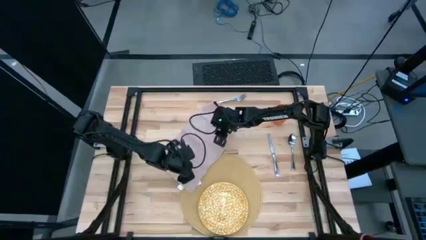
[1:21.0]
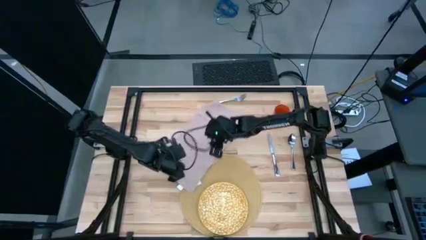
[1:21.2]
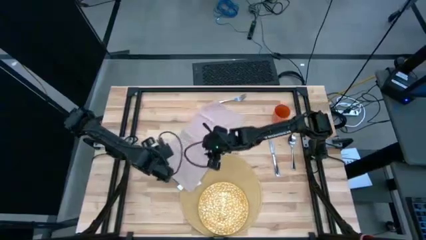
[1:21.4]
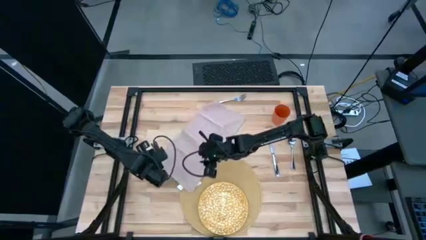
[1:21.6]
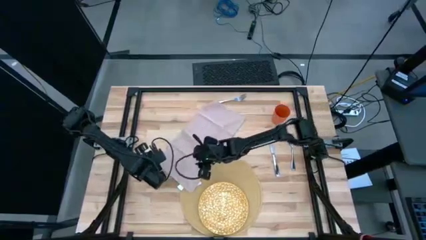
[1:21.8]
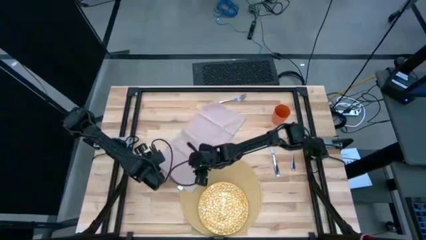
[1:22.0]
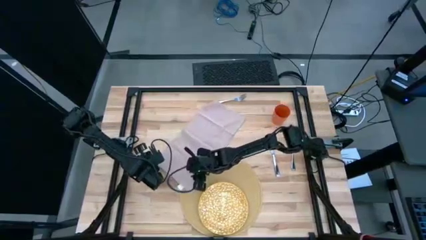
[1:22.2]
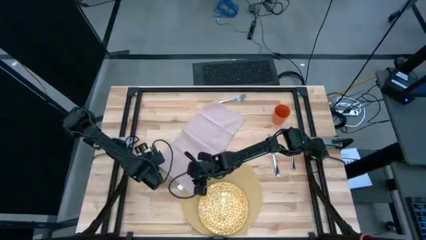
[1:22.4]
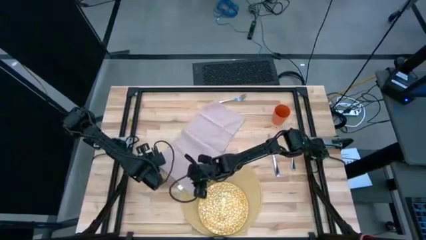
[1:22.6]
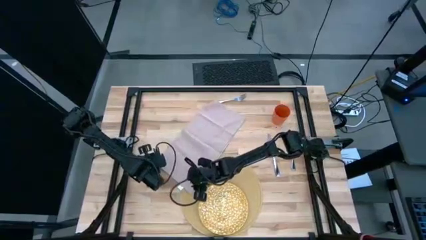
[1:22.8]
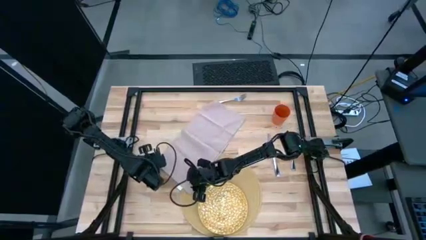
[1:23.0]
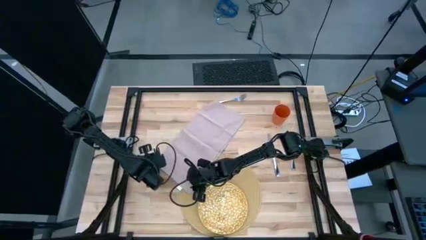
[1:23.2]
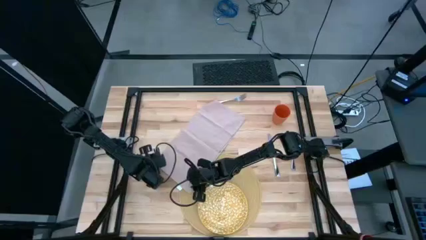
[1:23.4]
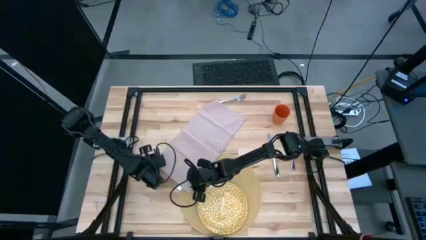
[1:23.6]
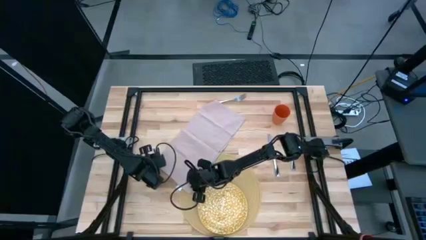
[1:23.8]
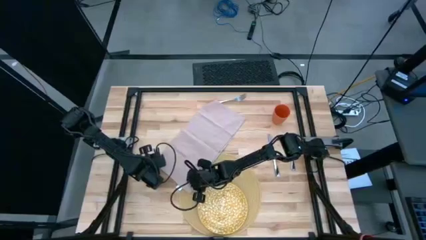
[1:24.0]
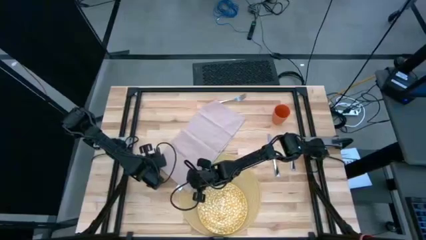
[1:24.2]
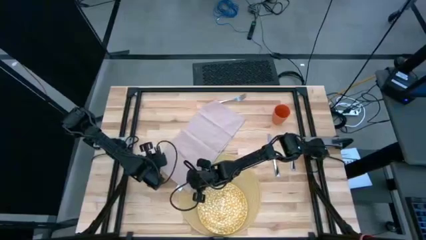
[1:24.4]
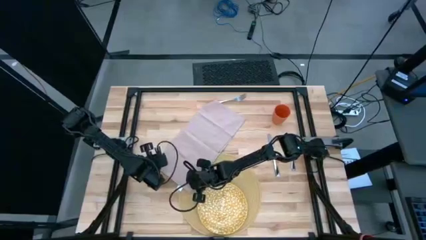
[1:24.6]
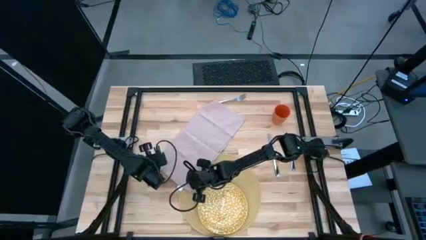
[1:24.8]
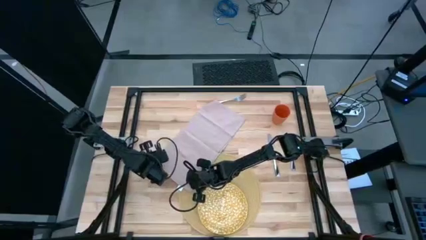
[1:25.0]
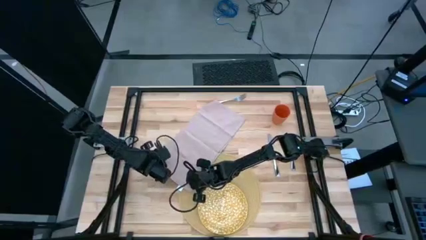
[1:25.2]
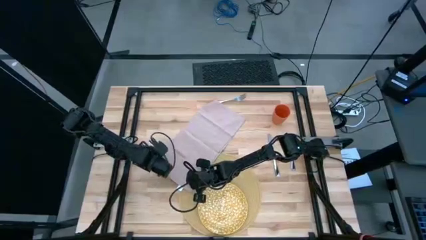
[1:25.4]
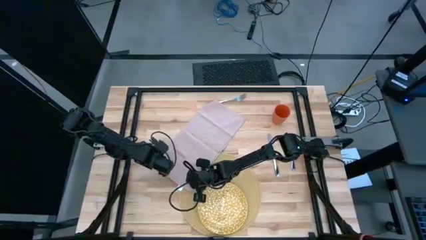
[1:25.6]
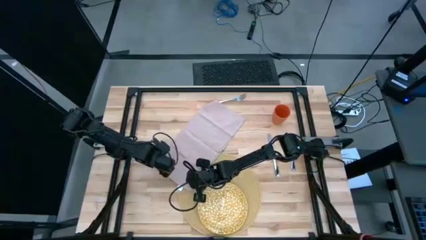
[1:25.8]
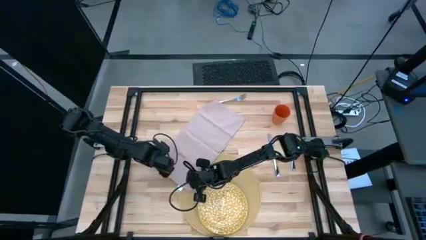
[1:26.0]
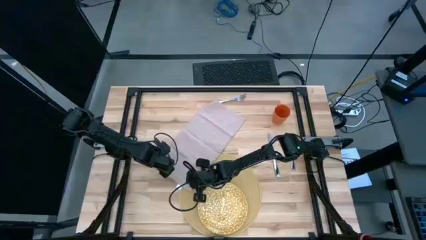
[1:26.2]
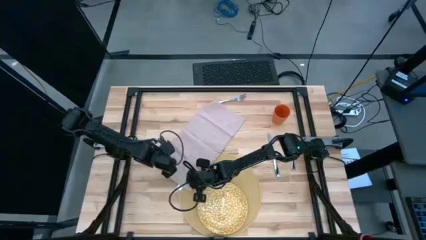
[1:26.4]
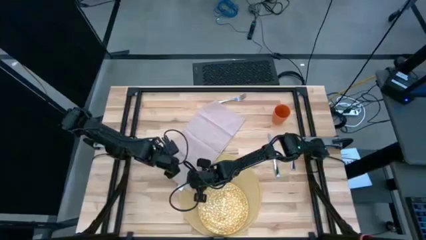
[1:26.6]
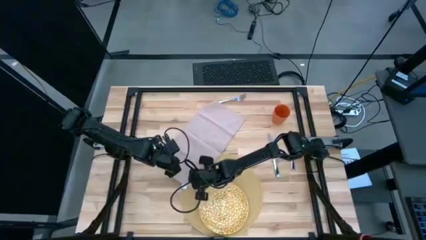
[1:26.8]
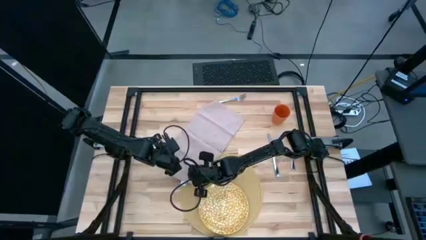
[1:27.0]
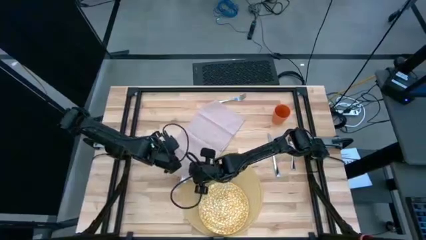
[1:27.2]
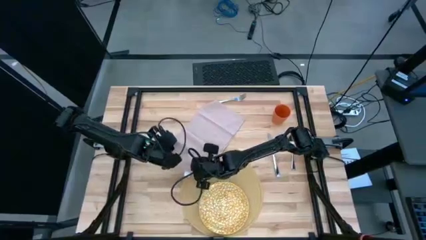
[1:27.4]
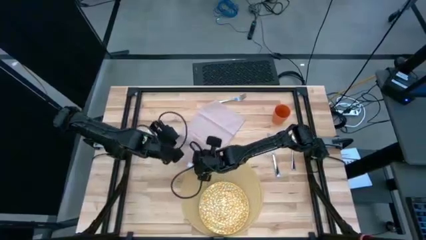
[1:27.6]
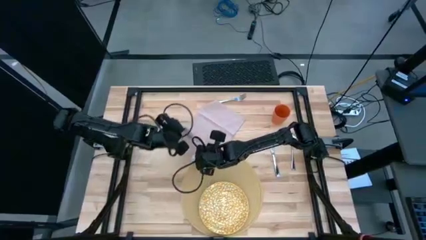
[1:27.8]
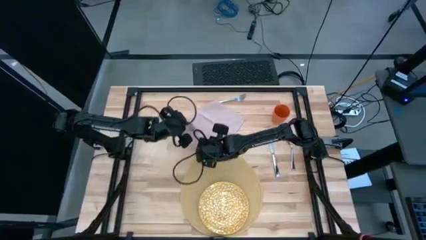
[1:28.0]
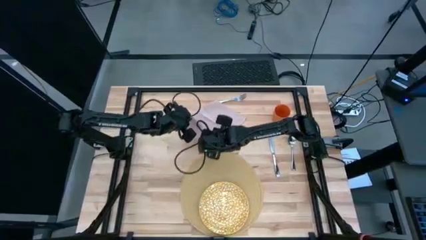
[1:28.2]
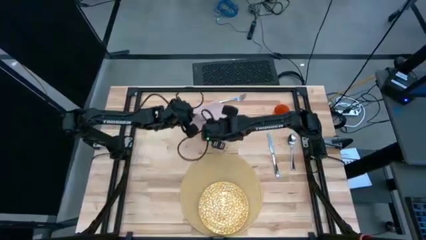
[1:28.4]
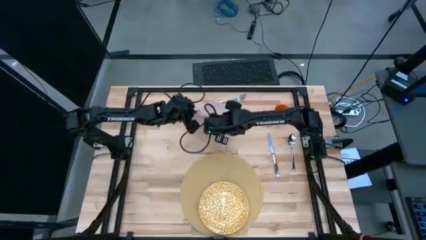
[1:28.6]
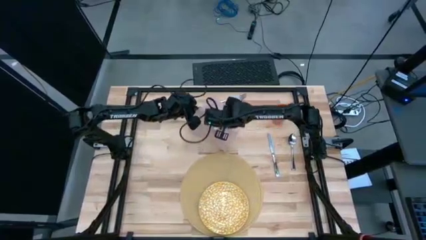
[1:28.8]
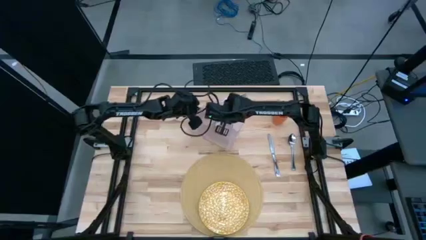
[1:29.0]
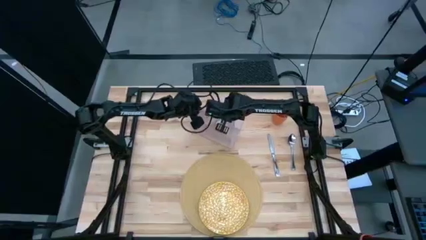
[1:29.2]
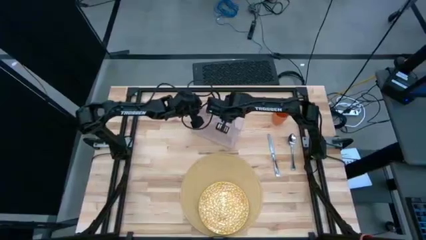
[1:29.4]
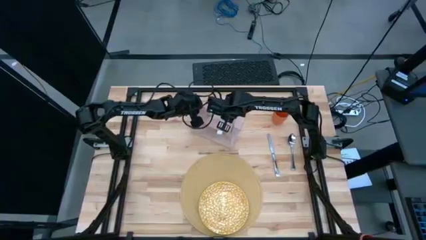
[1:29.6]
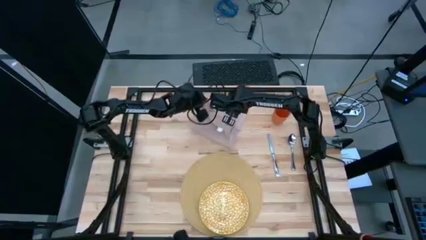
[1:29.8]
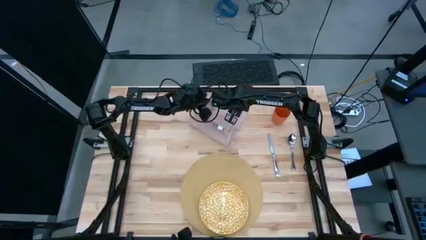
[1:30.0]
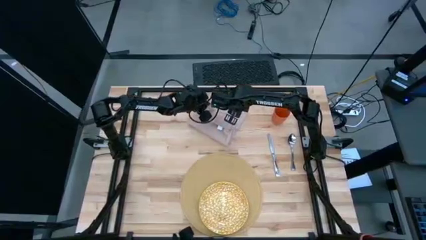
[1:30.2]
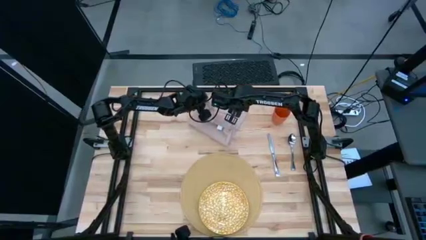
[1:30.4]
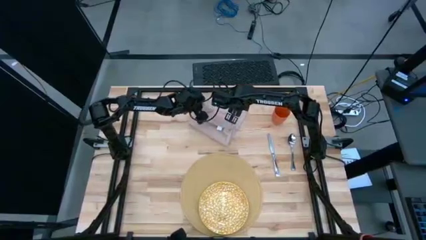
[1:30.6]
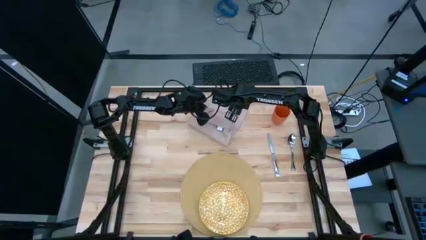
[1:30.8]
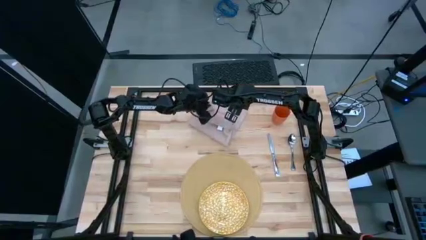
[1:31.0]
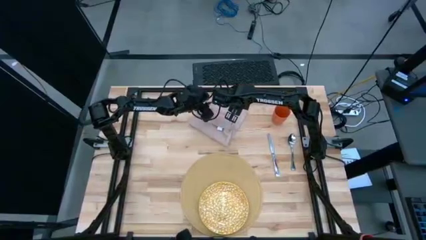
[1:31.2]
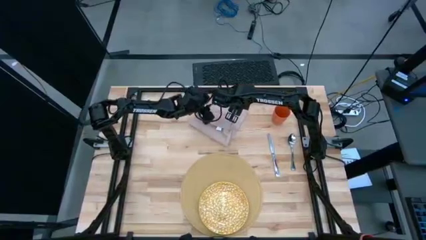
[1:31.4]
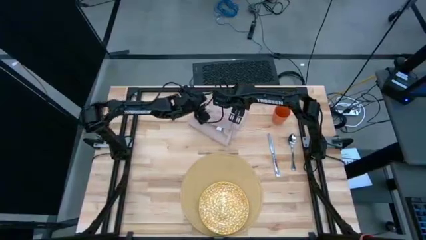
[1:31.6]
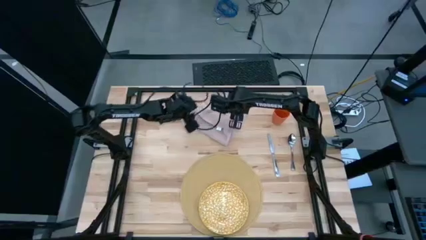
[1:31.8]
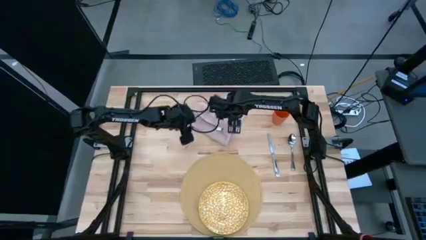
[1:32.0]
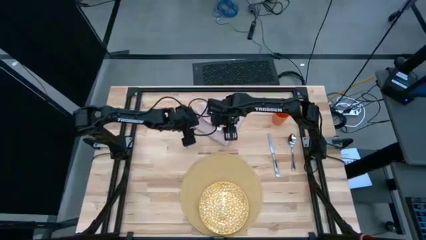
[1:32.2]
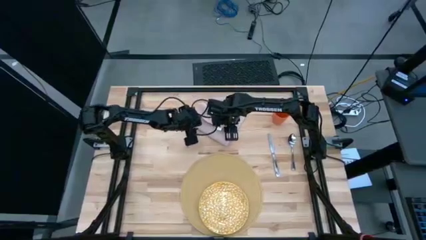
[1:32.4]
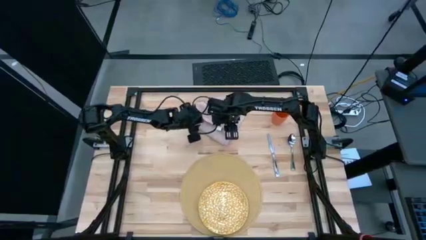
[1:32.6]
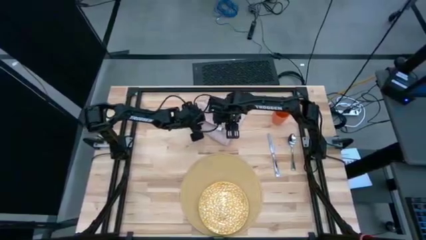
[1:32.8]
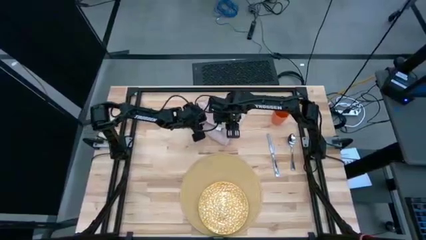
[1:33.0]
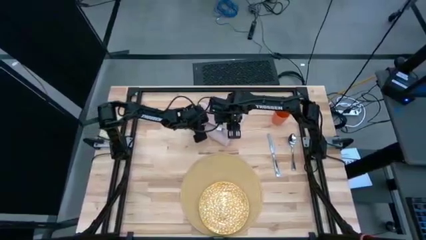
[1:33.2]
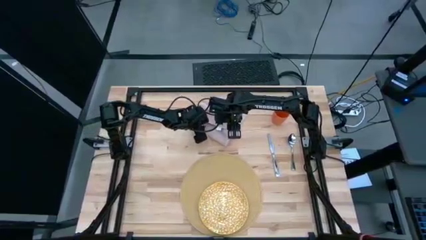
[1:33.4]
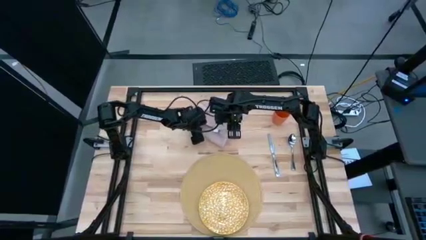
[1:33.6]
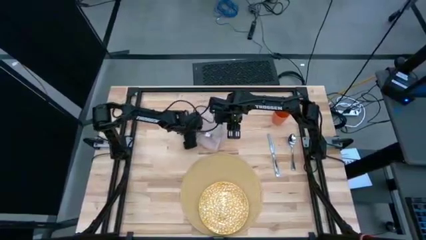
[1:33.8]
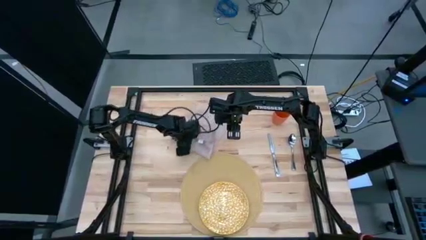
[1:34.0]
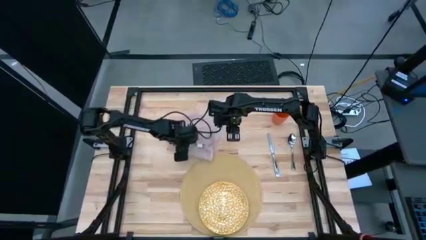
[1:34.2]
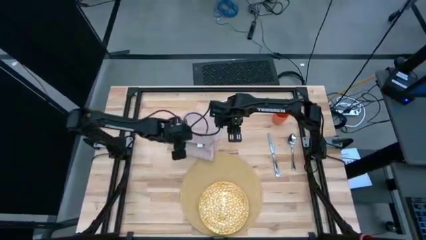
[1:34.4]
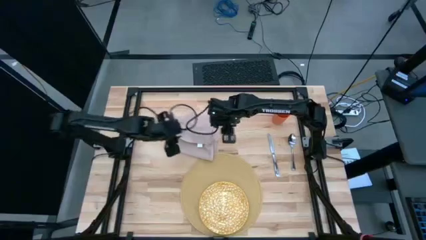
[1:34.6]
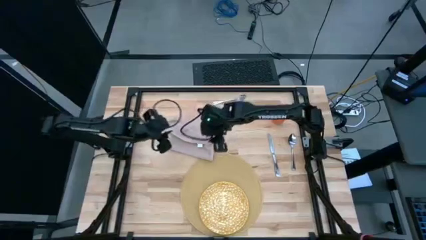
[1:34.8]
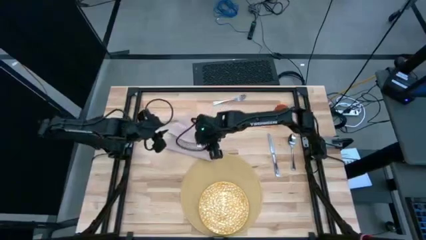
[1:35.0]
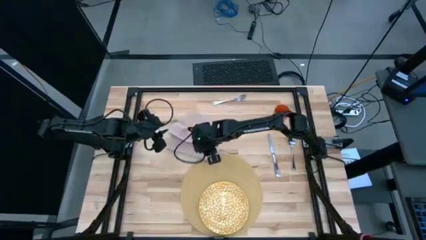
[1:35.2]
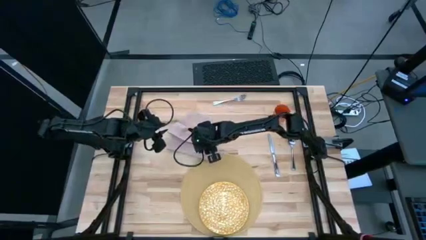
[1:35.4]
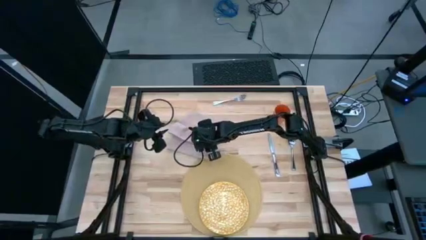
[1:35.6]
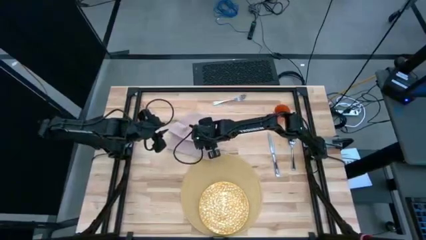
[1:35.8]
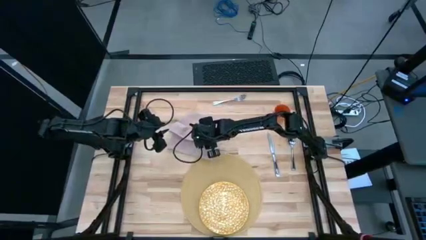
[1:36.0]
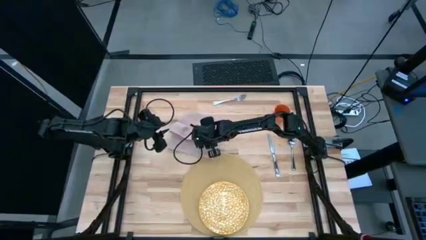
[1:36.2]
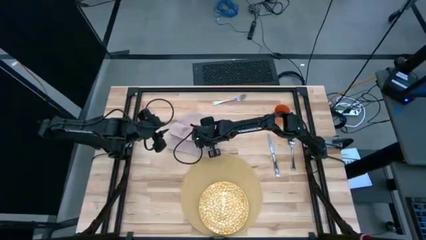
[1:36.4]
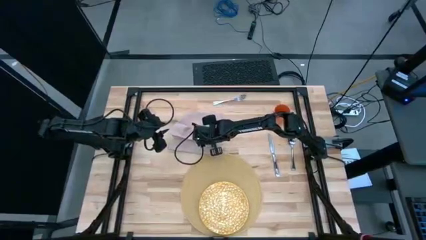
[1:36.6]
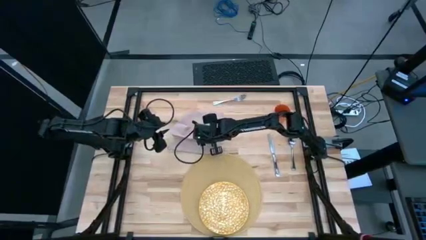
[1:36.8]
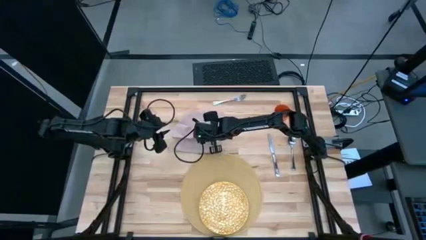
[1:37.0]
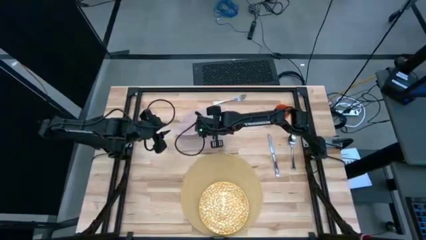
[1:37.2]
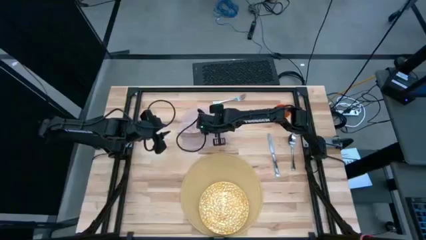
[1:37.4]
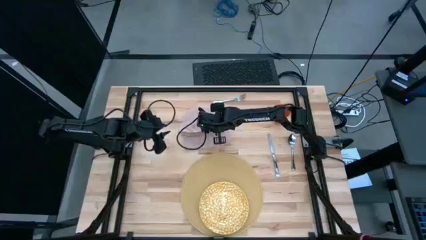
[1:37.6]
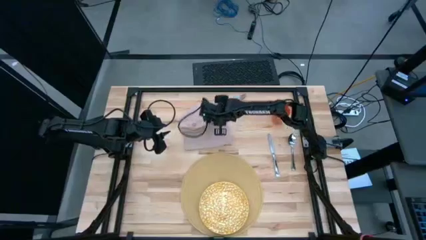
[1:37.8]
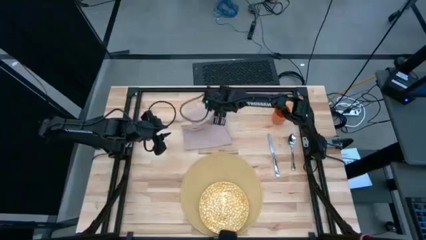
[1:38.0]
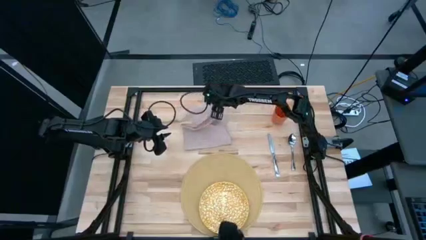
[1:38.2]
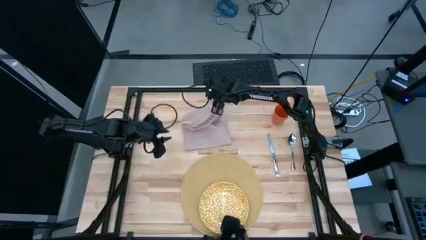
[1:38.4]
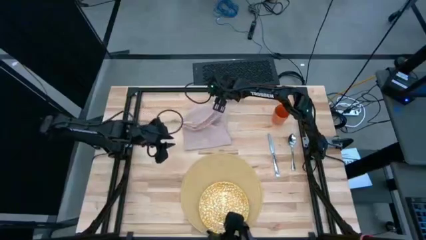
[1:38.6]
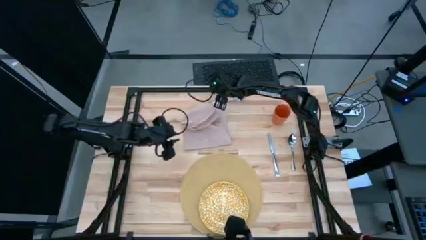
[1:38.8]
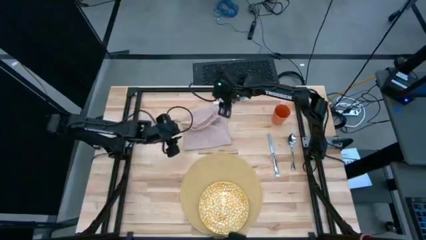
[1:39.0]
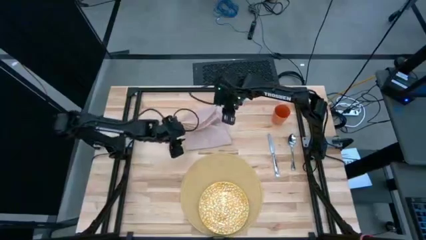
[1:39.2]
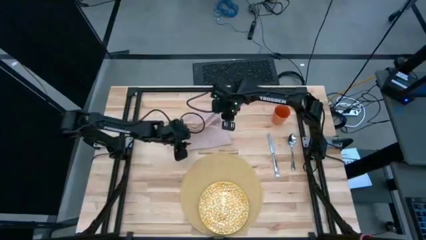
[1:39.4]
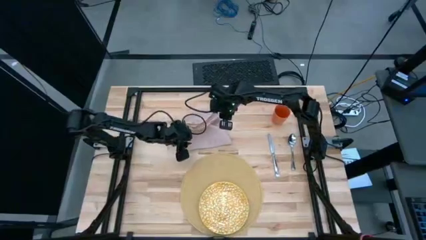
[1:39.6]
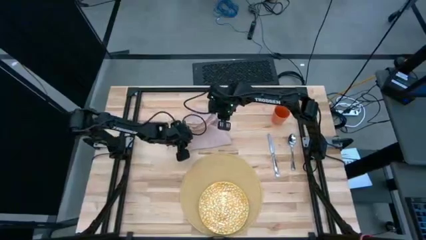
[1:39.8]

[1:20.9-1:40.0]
Task: Set table place
Fold the brown table napkin
